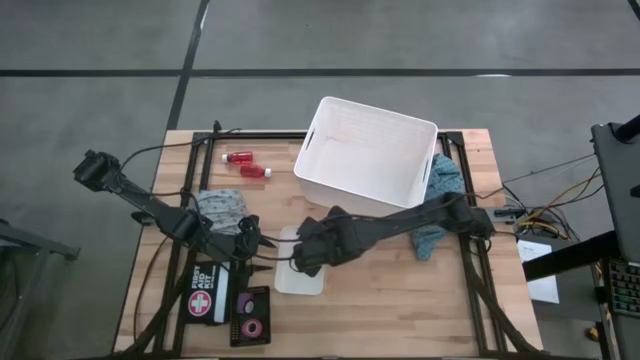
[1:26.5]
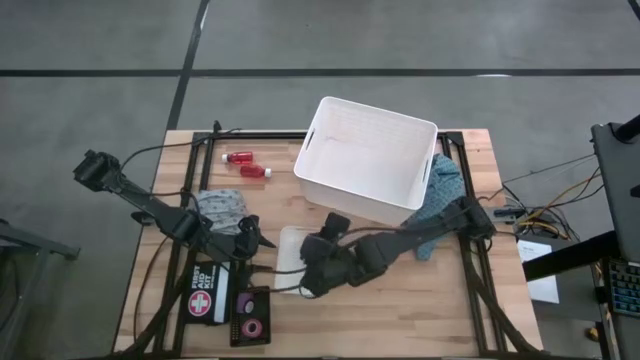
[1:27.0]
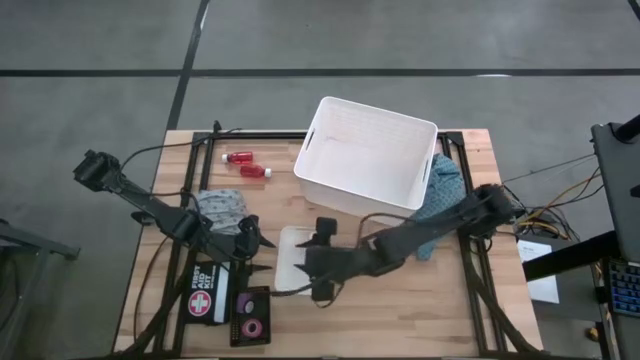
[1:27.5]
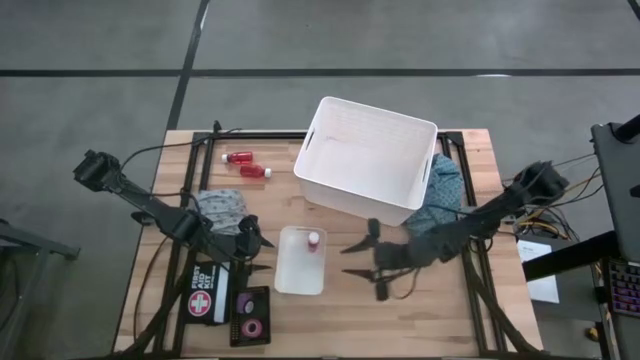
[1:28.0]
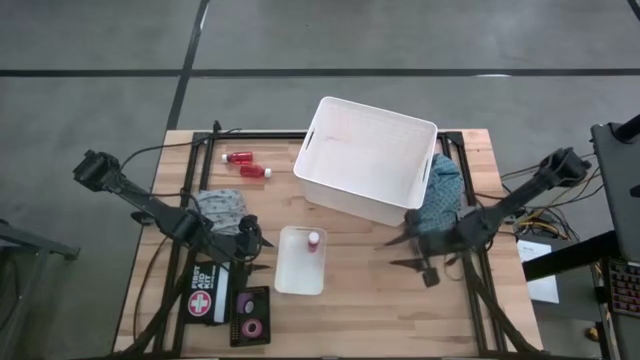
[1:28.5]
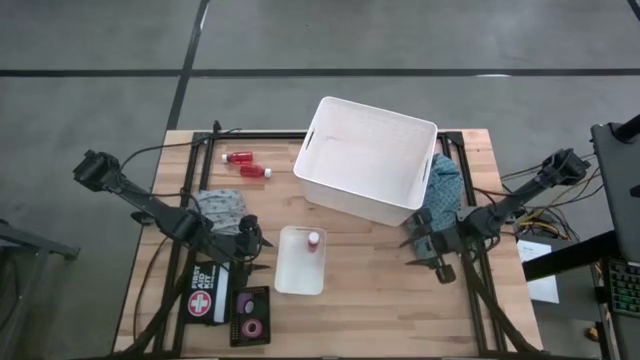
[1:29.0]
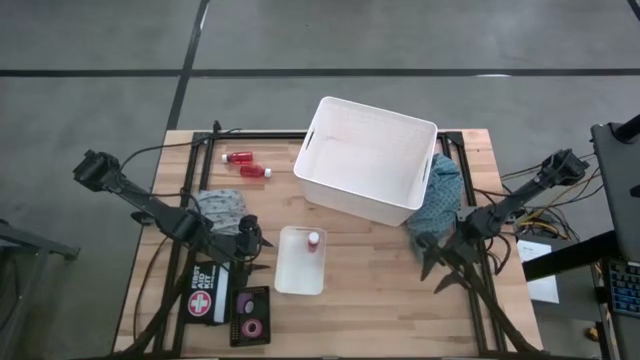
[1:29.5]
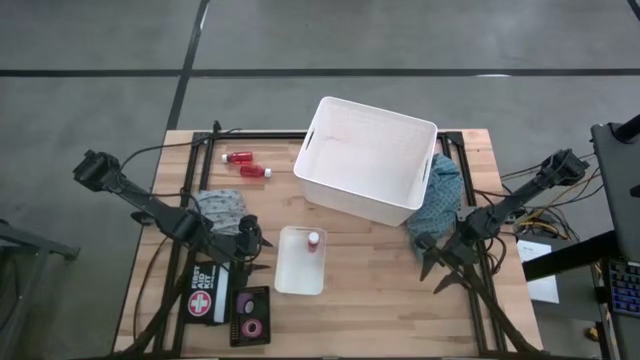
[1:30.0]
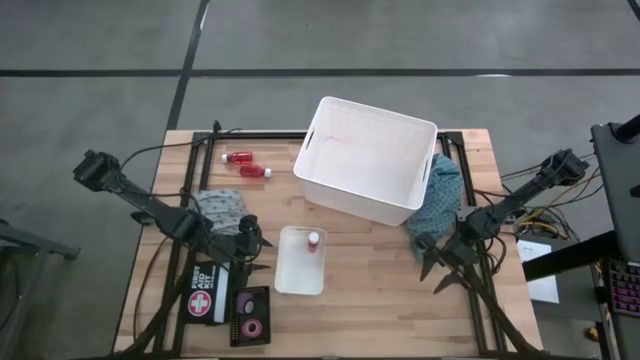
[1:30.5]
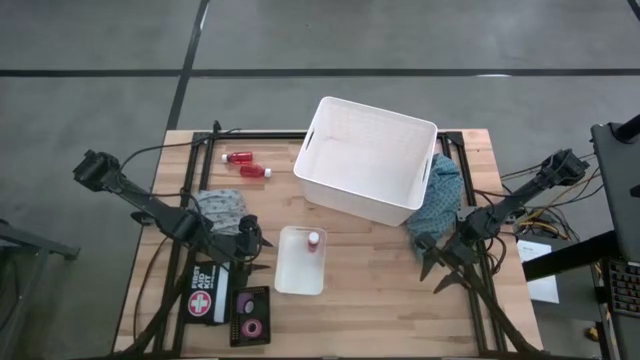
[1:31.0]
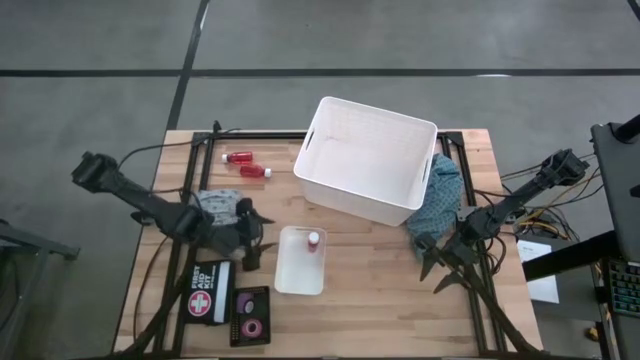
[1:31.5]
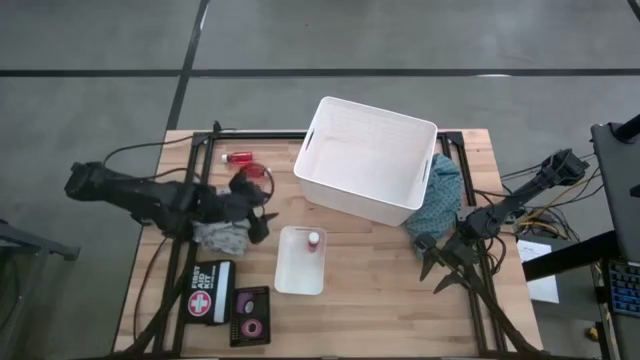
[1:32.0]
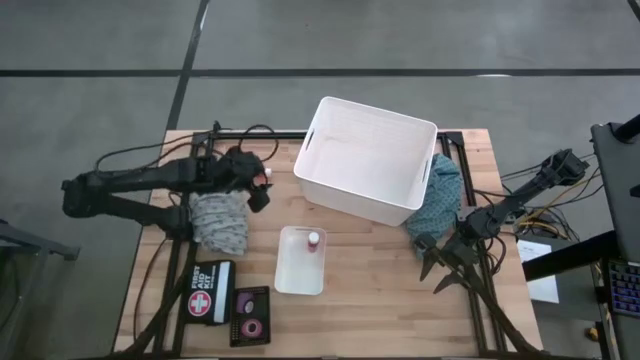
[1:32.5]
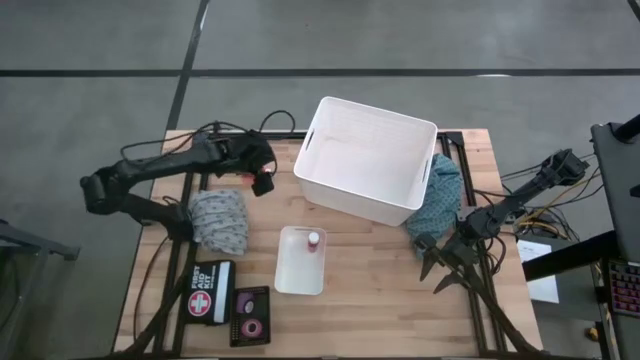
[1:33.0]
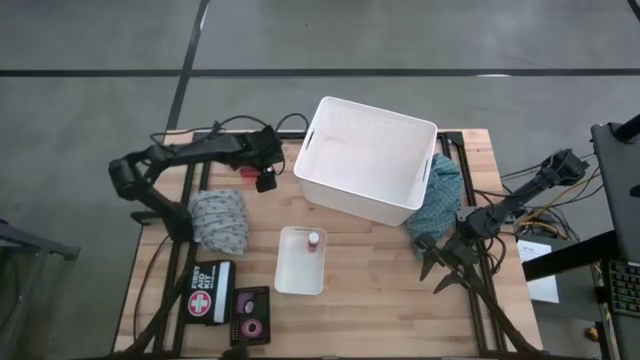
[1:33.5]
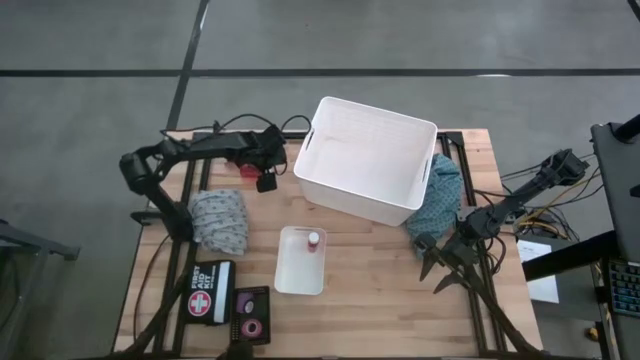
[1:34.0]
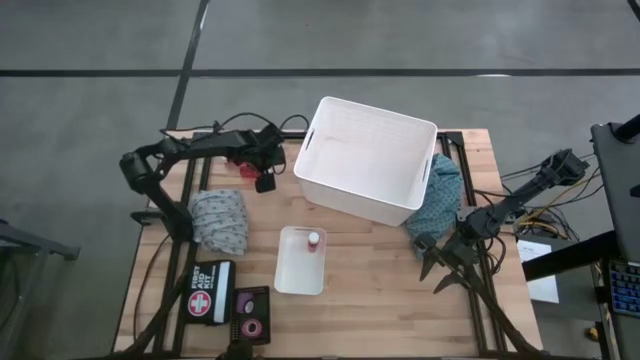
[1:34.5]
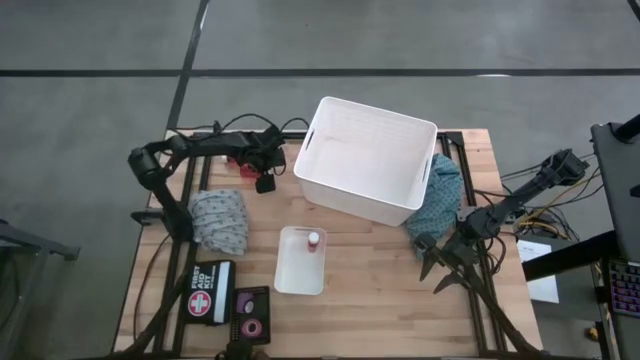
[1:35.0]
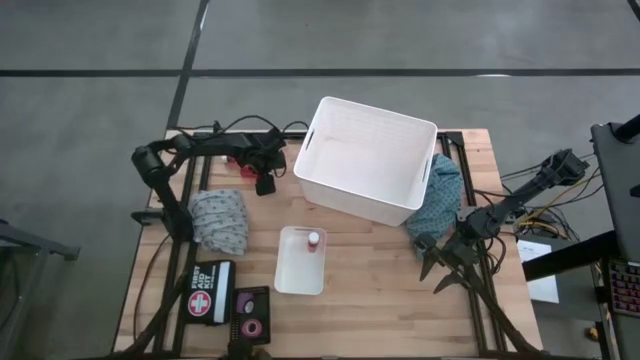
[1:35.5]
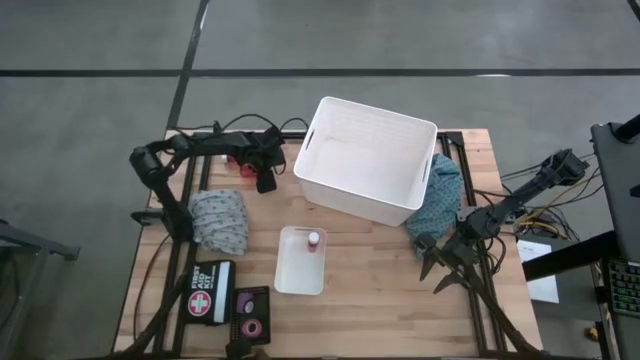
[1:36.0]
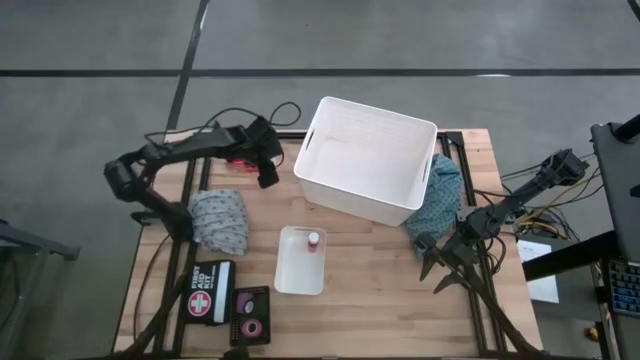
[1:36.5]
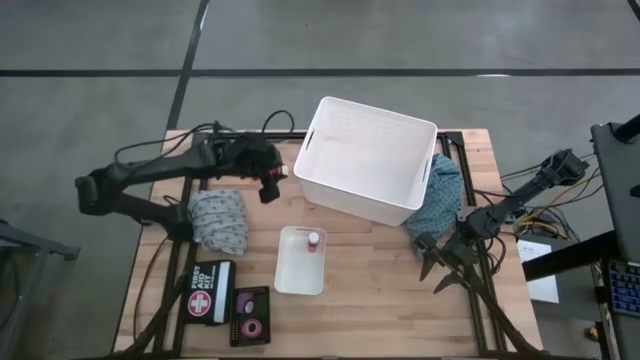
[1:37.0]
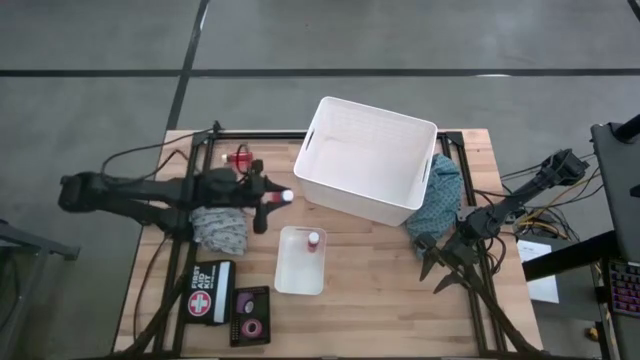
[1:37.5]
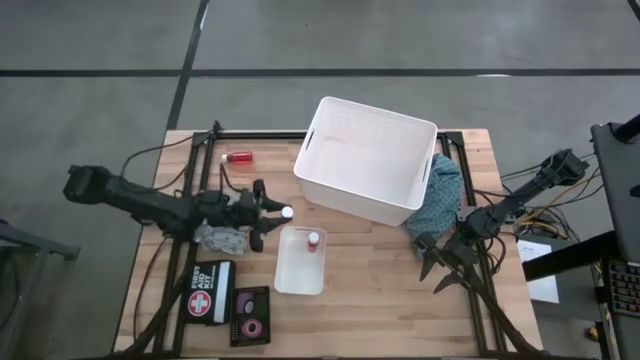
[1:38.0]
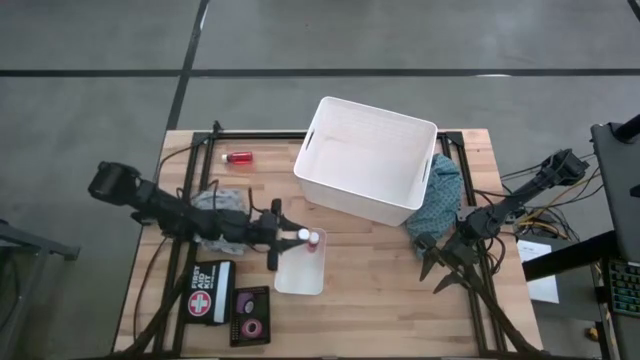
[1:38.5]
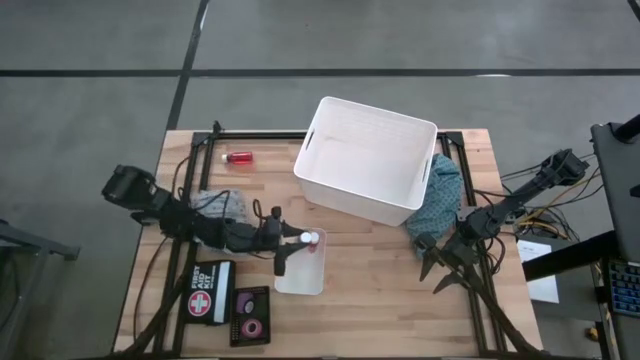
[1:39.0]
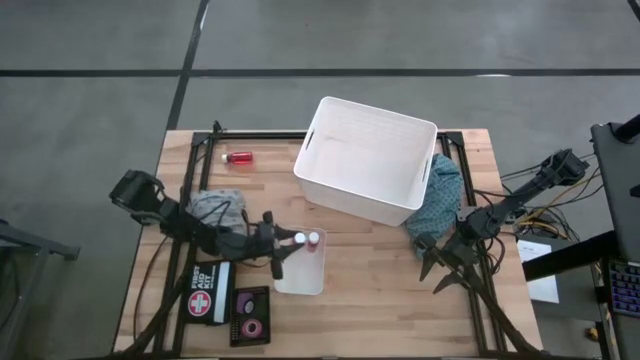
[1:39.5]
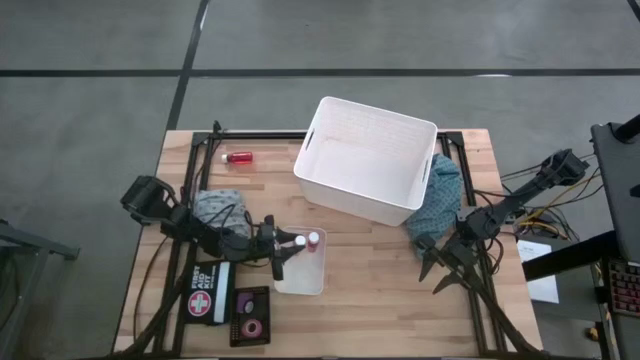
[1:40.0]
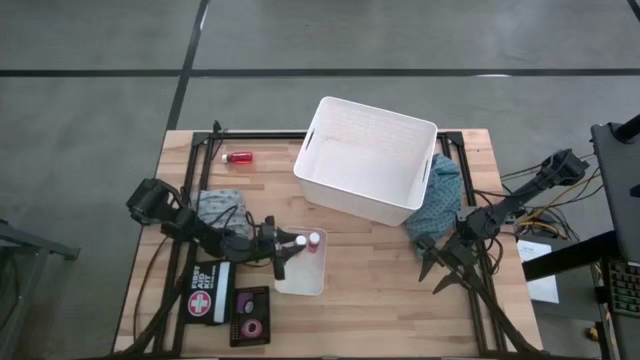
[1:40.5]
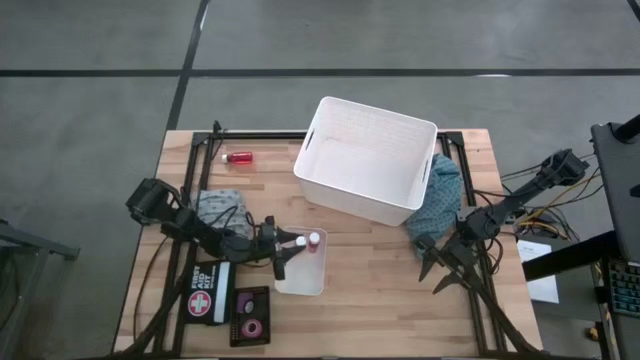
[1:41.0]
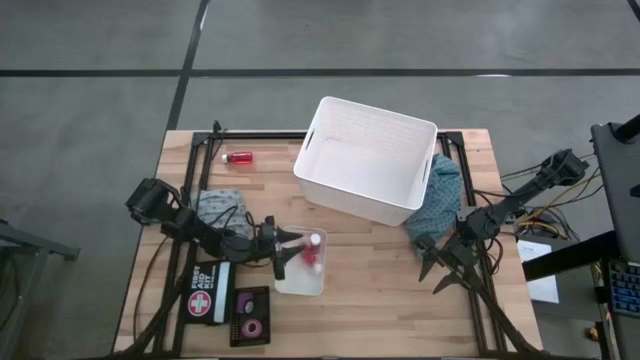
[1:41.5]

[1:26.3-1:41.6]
Task: Pick & Place Medicine items
Put the bottom red medicine bottle into the small white bin

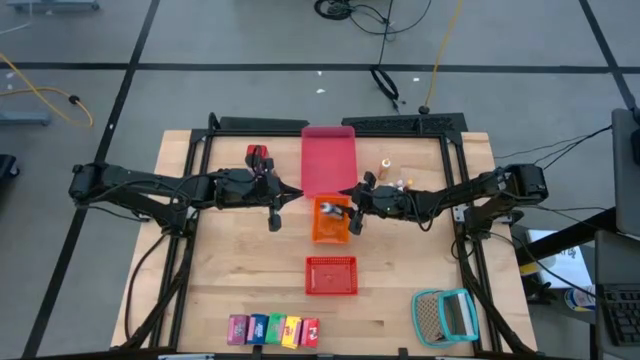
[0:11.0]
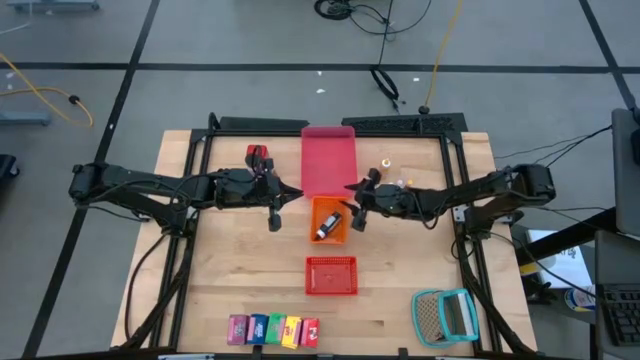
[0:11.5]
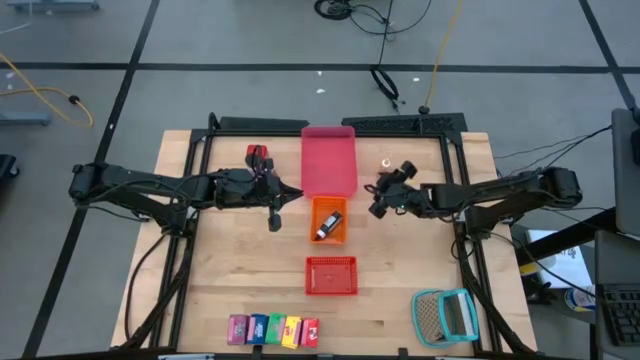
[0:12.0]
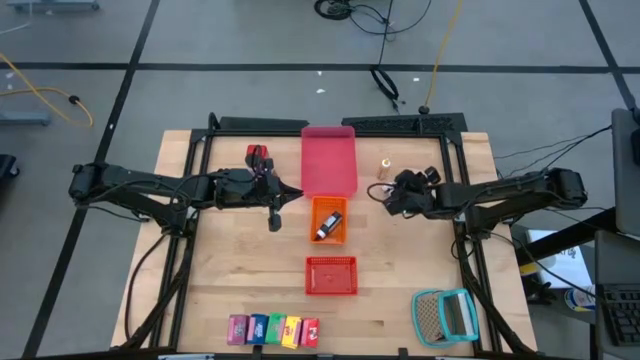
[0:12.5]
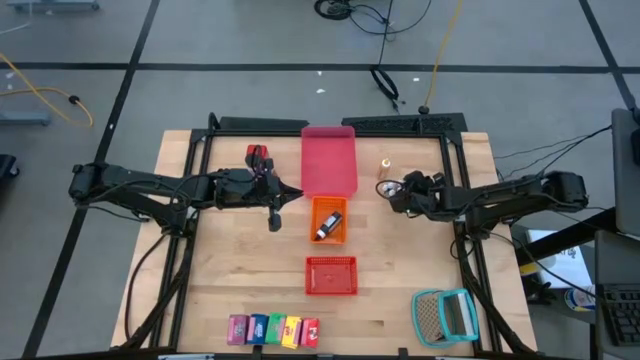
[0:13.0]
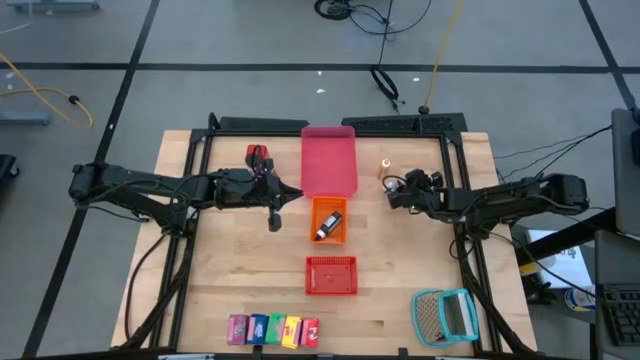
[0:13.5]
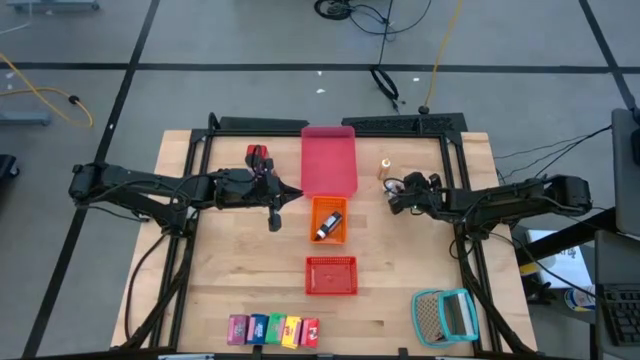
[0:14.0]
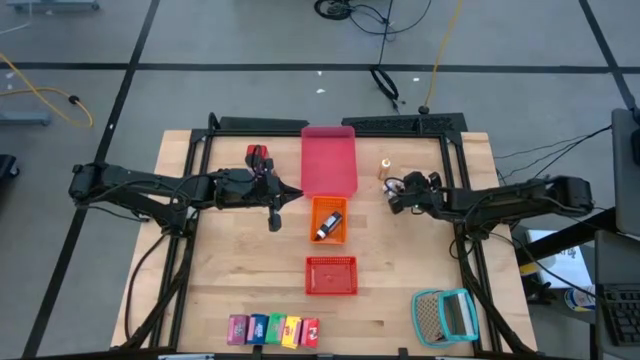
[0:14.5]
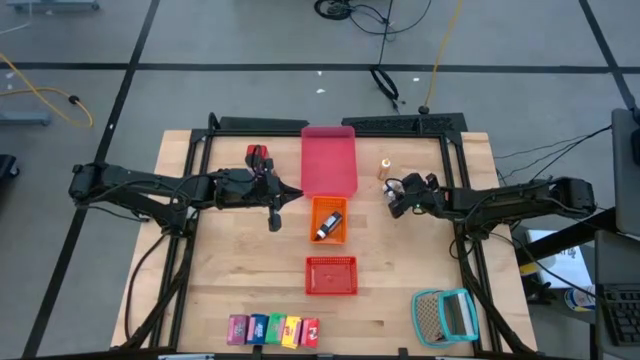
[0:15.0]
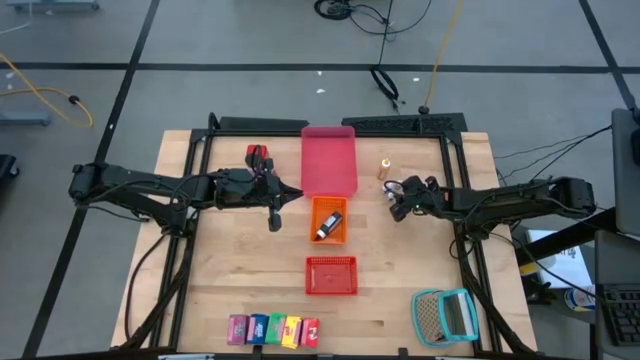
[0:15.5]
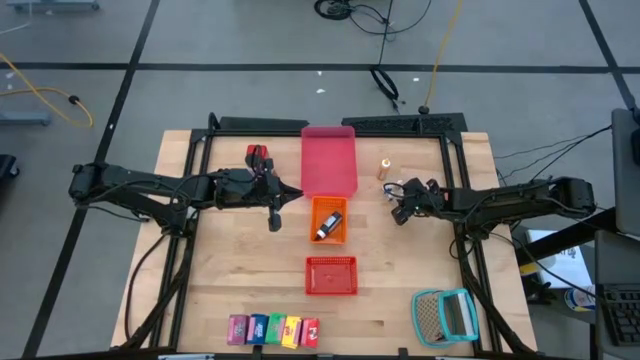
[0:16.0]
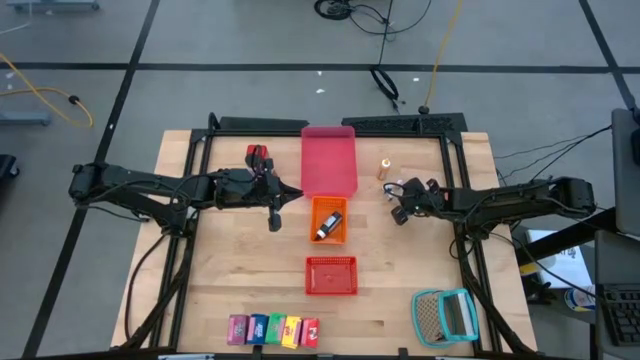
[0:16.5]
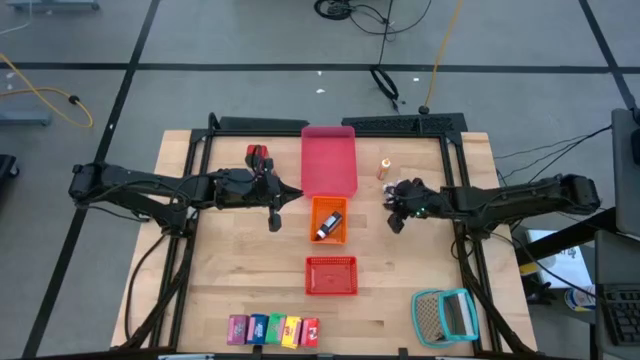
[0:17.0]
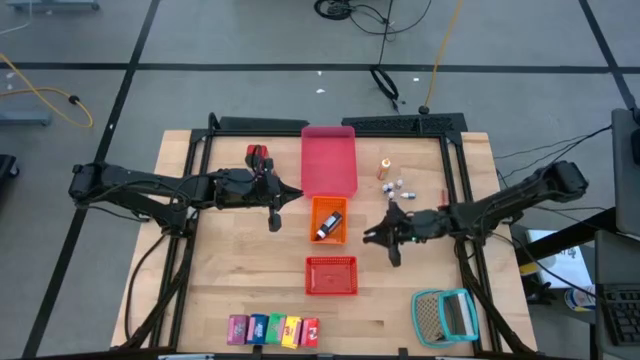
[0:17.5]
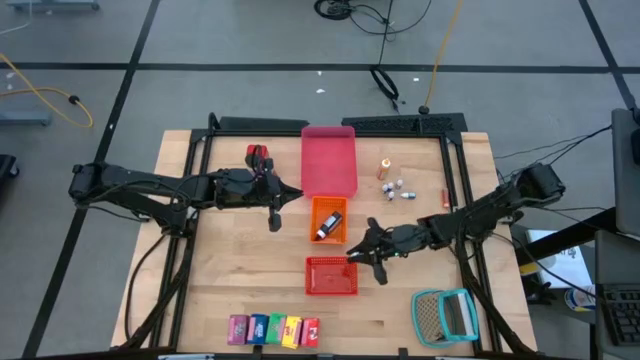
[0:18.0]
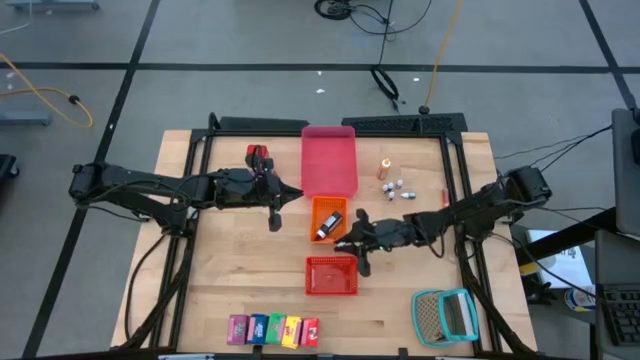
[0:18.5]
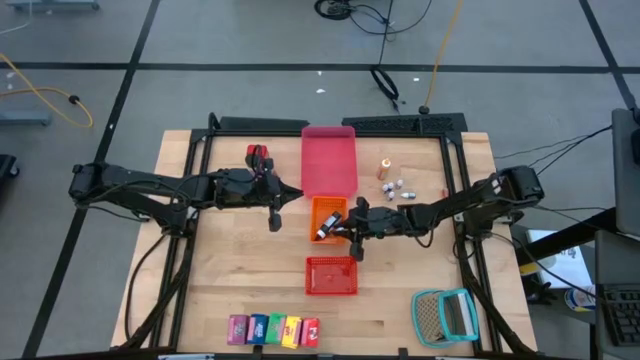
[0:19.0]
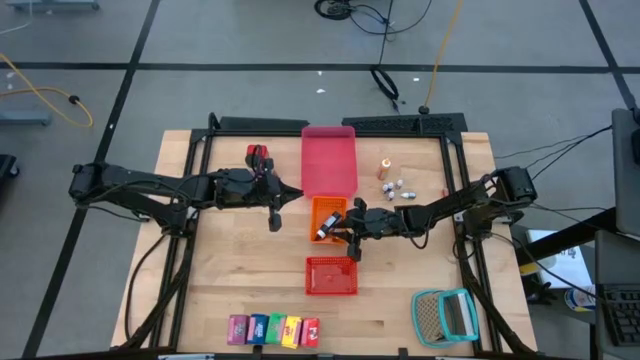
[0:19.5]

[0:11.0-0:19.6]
Task: Pick & Place Kitchen Items
Put the small black food coloring bottle into the orange basket
